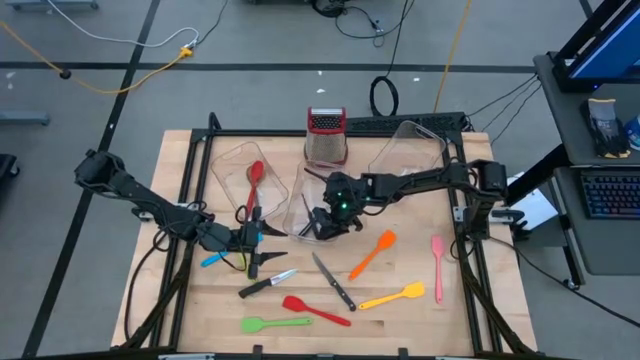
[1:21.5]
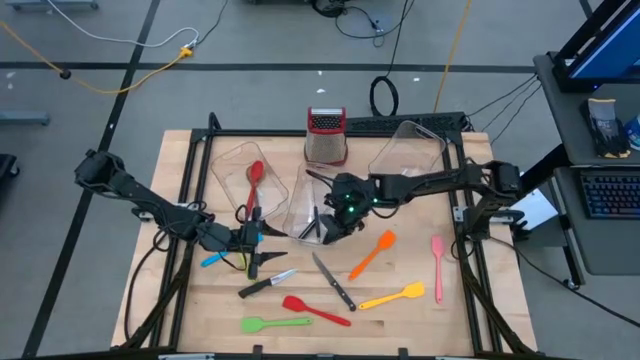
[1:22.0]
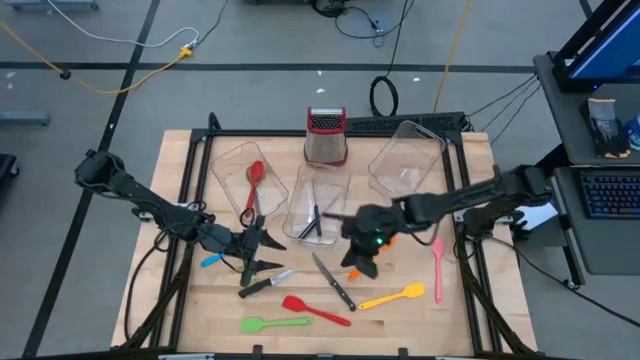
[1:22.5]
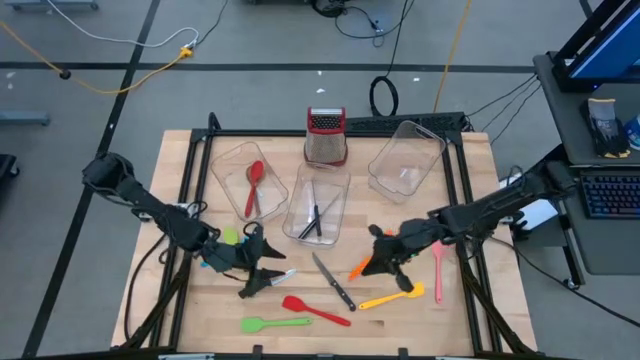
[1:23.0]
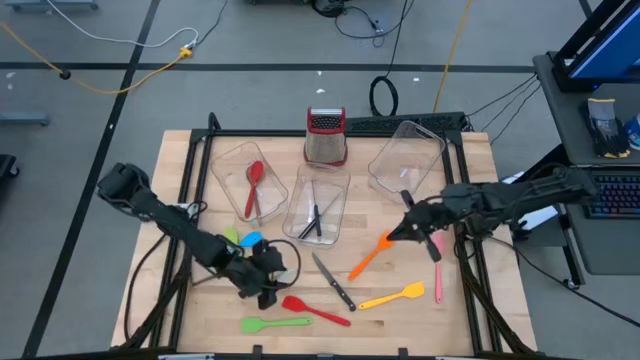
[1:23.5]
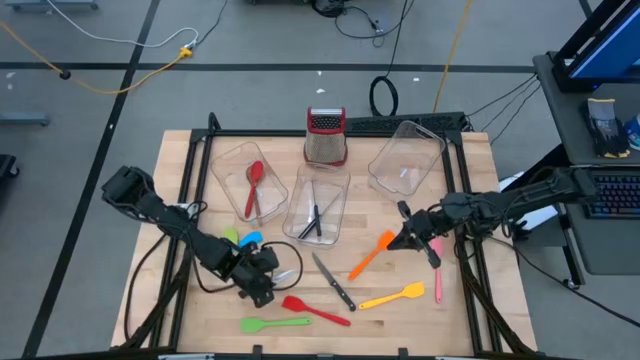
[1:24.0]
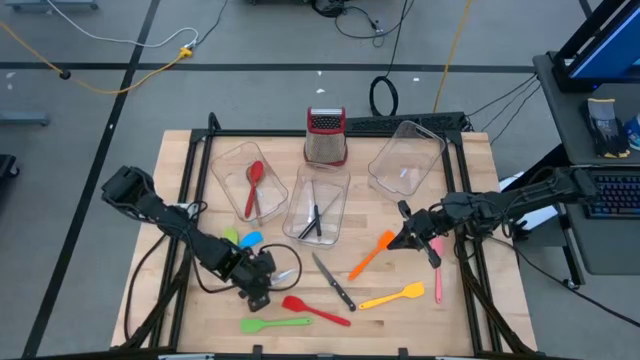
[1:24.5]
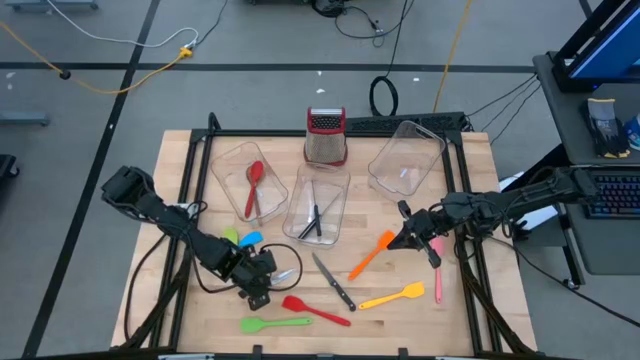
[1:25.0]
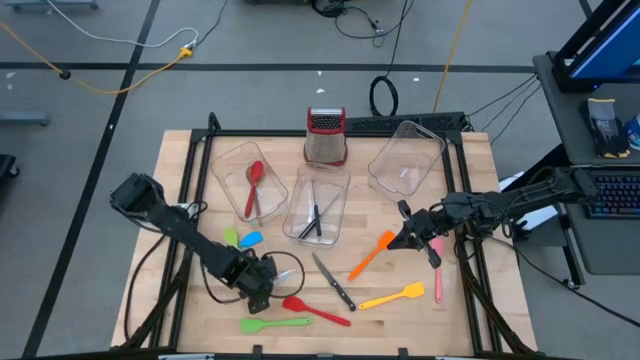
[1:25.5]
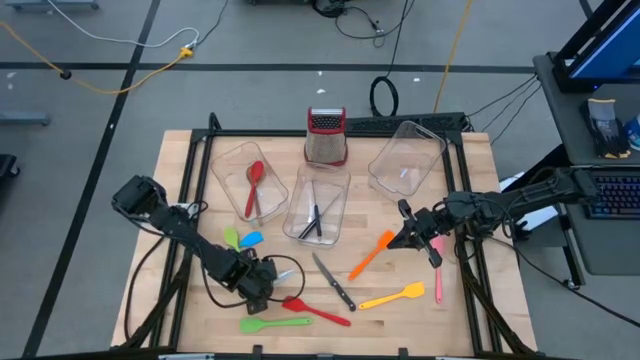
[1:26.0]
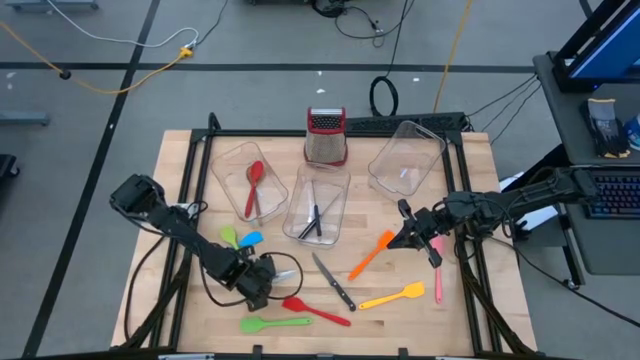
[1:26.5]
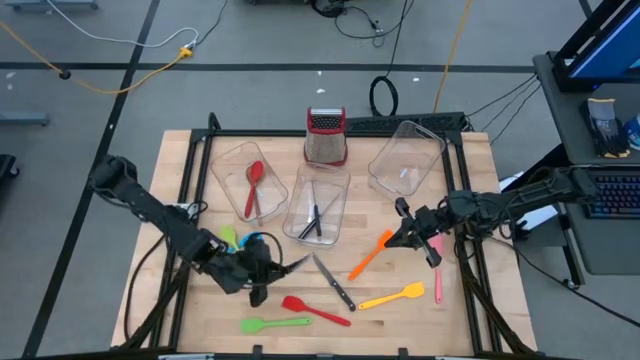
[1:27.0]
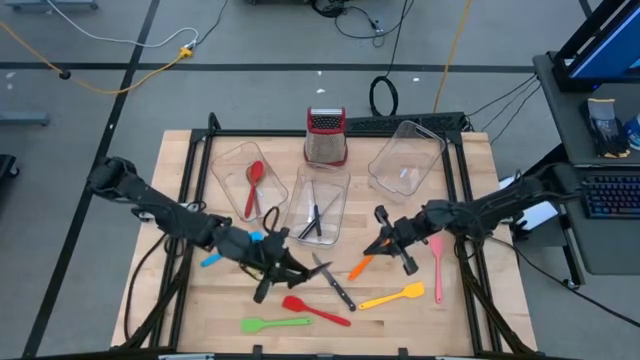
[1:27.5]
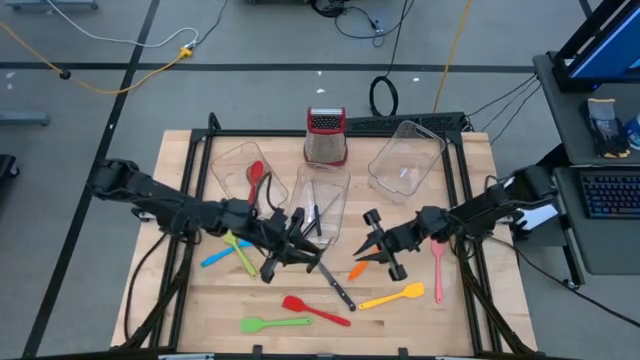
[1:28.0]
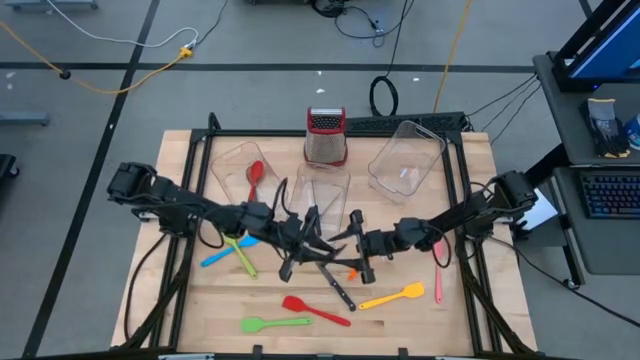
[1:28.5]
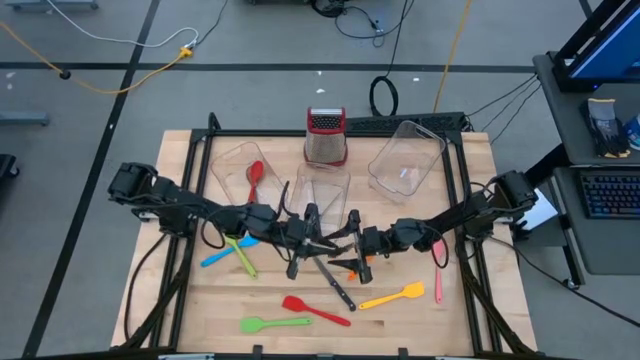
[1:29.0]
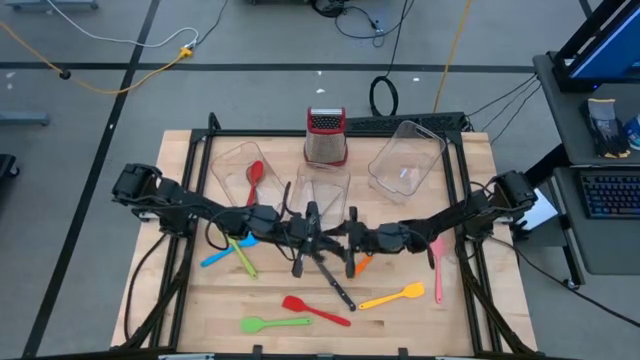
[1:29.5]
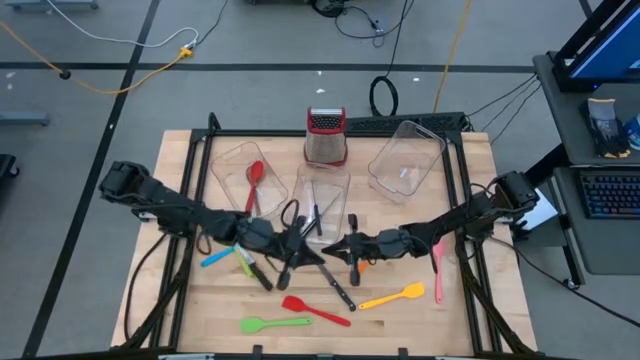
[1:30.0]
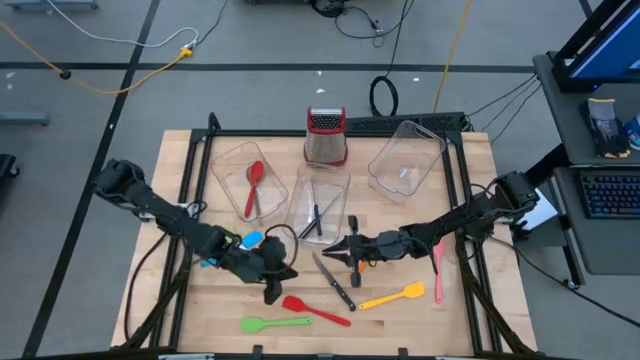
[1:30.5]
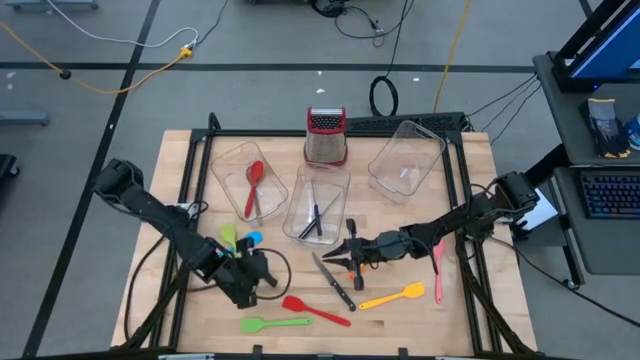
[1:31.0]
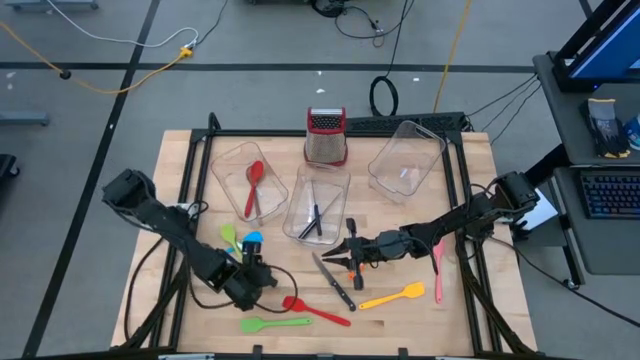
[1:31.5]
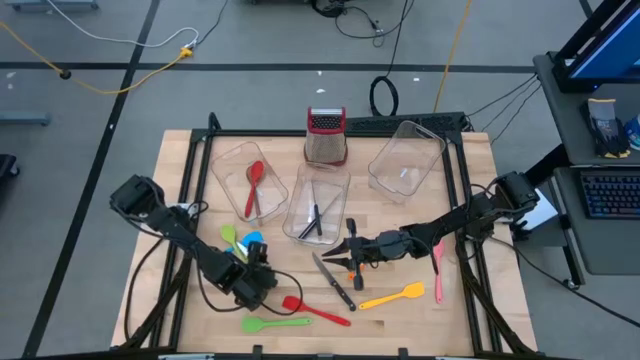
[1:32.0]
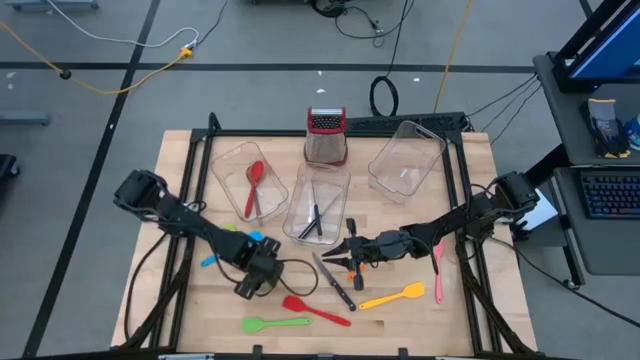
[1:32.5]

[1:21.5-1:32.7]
Task: Pick & Place Kitchen Items
Put the black knife into the middle transparent bin

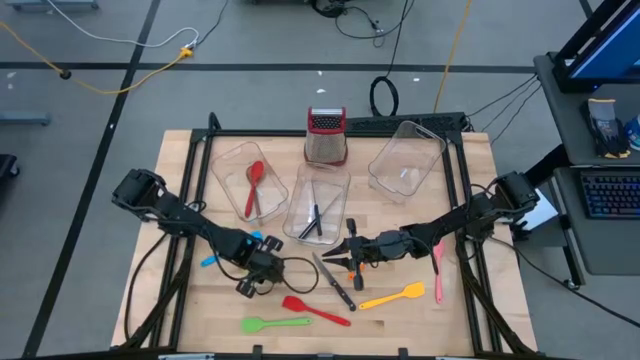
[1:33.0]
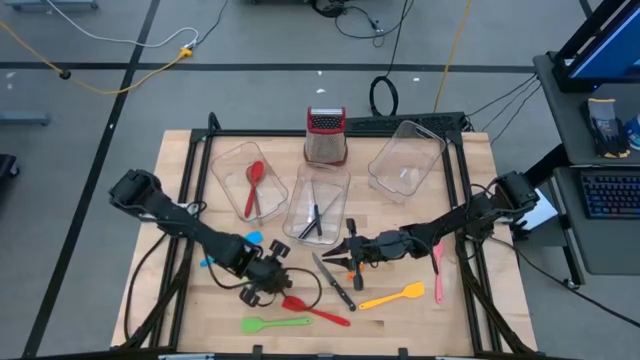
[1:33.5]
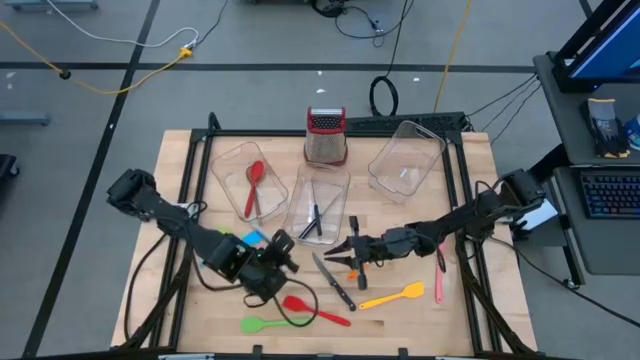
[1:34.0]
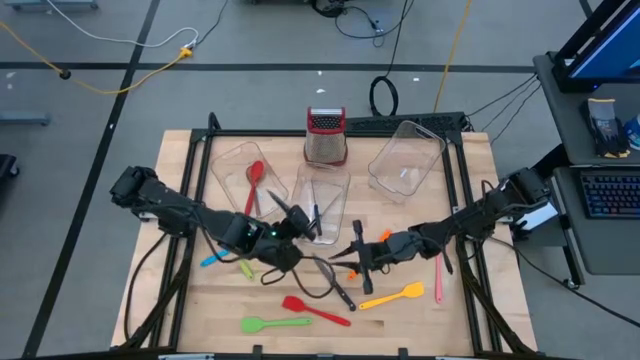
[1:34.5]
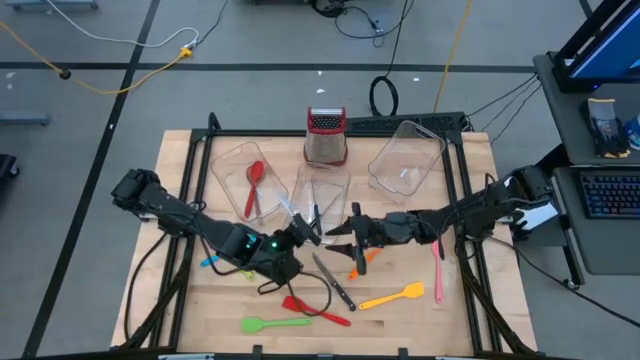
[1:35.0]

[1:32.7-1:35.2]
Put the black knife into the middle transparent bin

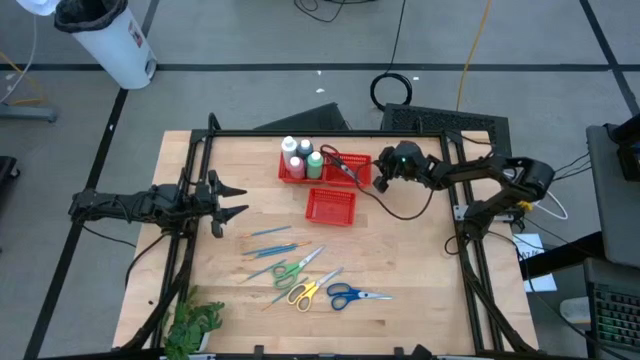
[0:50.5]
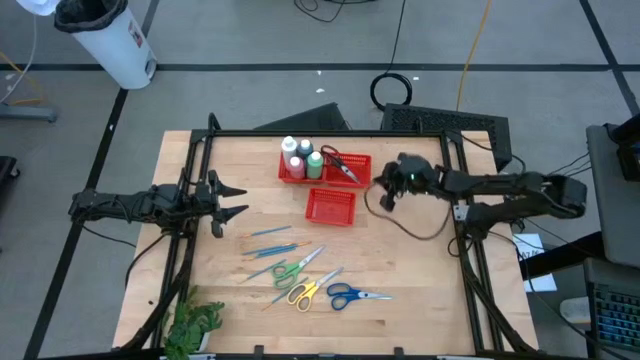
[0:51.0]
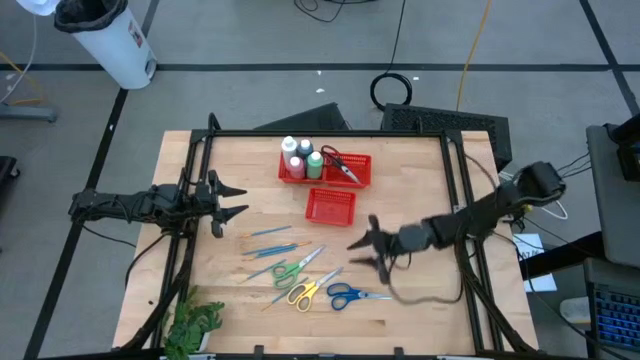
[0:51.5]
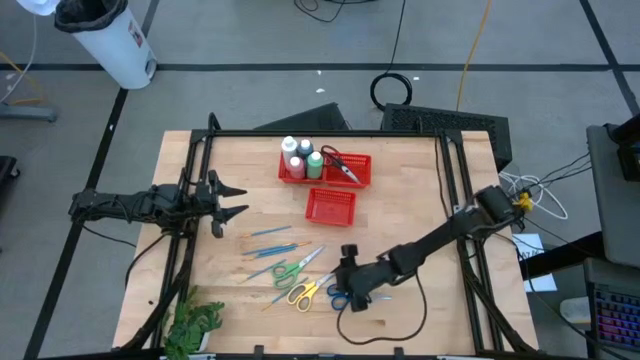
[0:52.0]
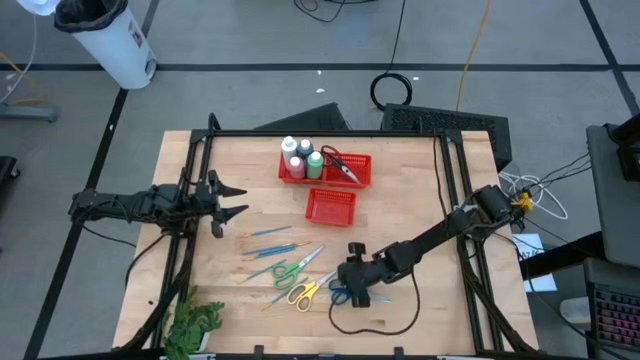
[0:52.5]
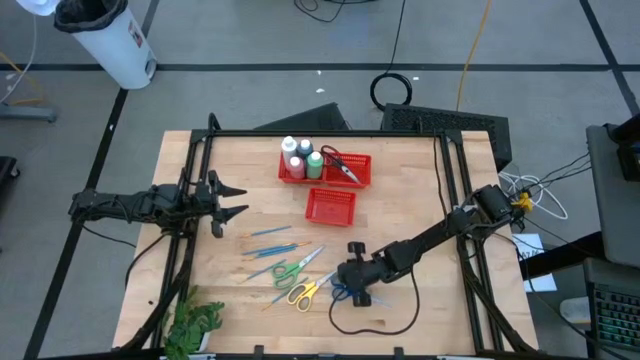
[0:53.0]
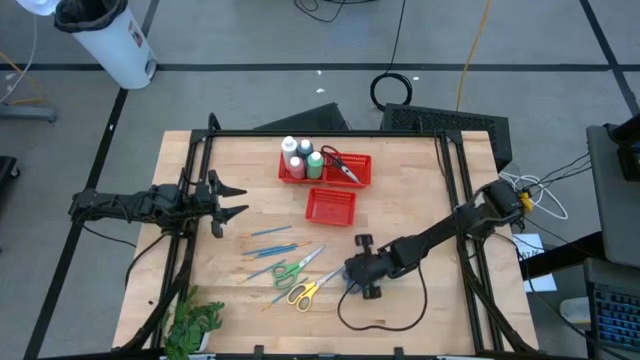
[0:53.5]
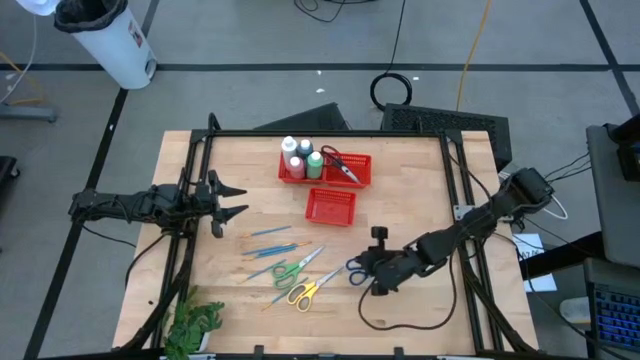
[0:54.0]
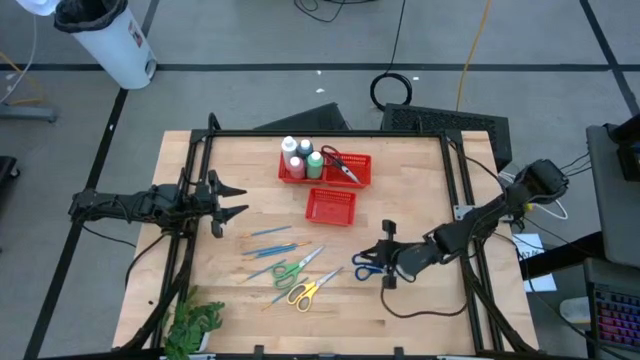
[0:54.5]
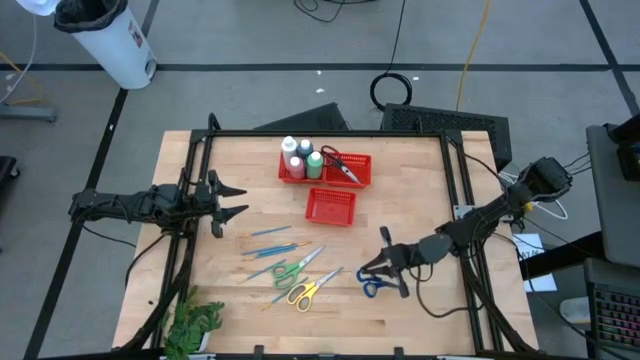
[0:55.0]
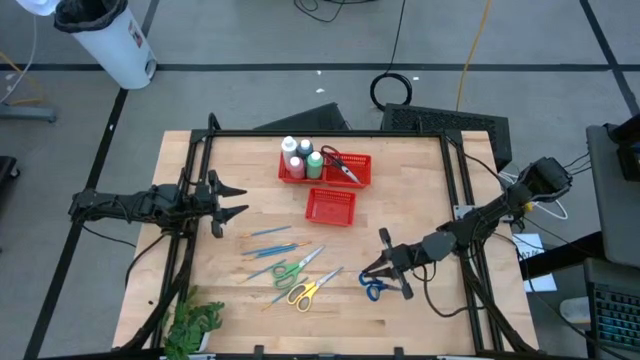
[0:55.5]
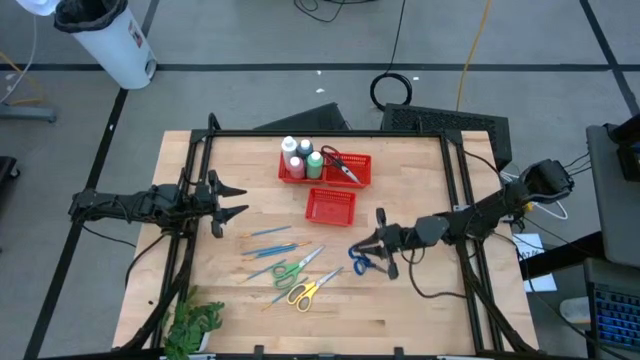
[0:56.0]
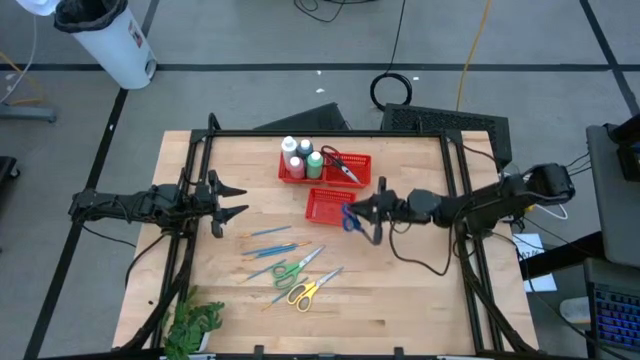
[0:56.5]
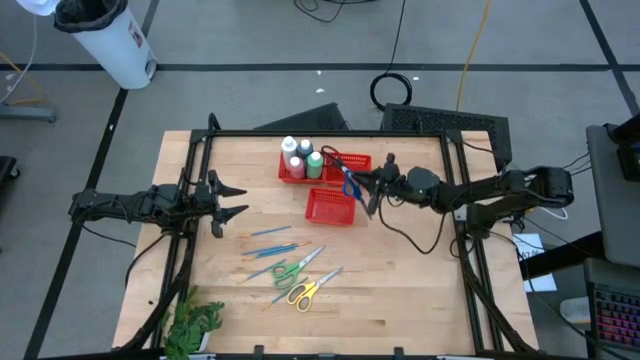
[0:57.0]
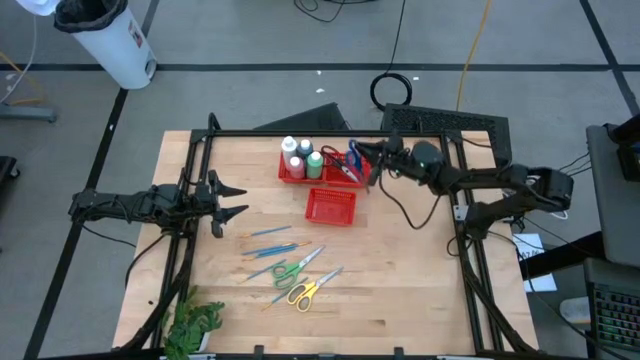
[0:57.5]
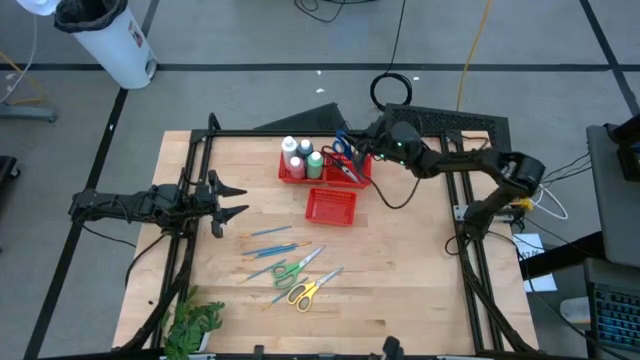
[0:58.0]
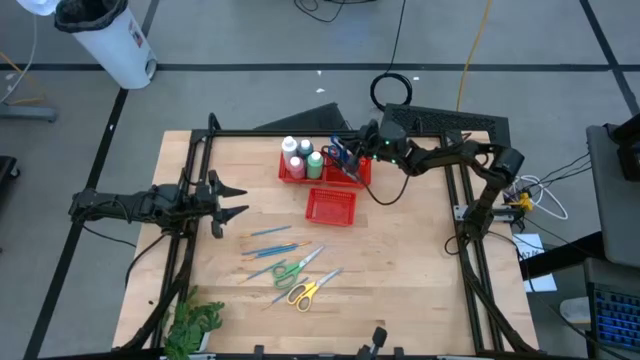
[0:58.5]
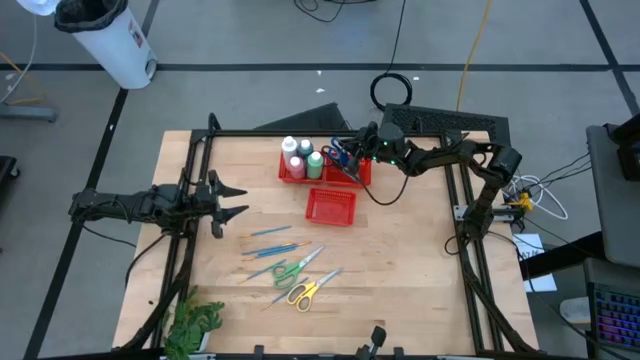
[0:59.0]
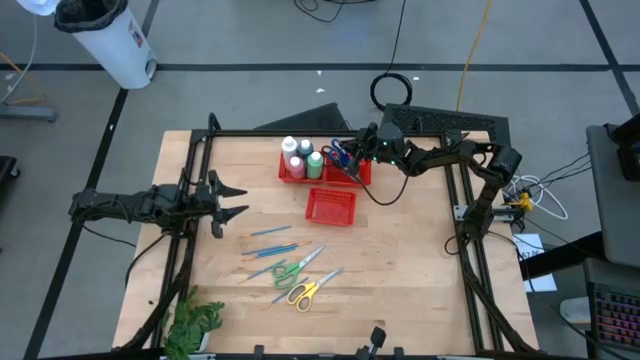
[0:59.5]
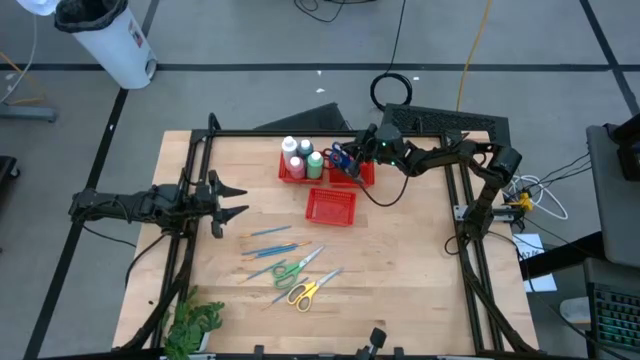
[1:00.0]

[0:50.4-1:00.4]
Task: Pick & Place Paint Supplies
Put the blue scissors into the top right red bin
